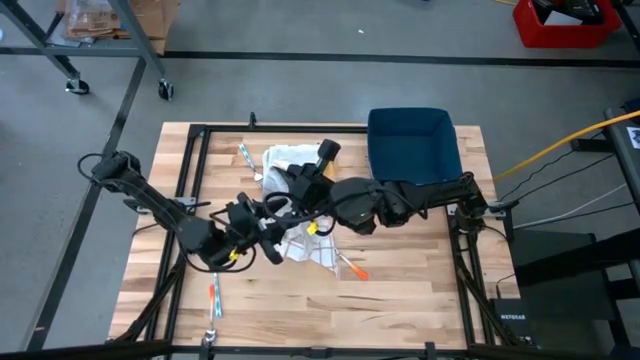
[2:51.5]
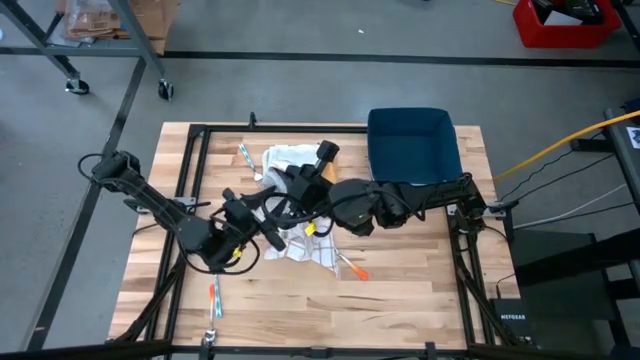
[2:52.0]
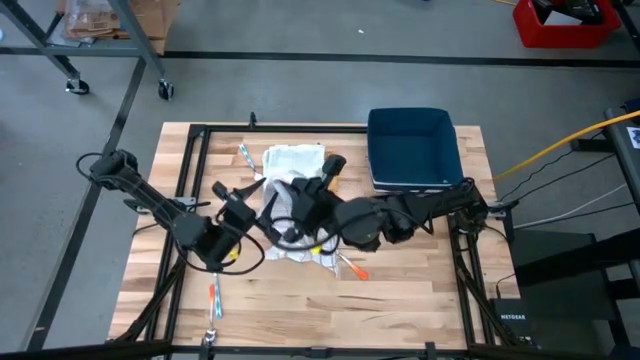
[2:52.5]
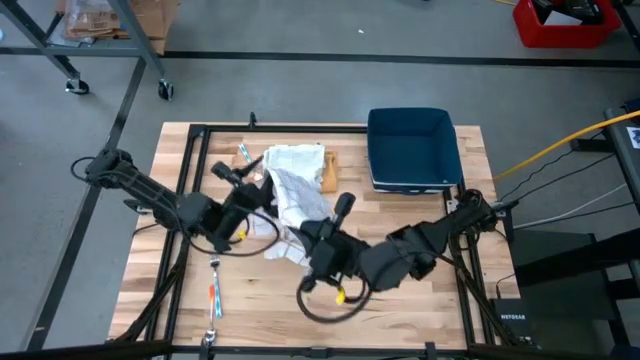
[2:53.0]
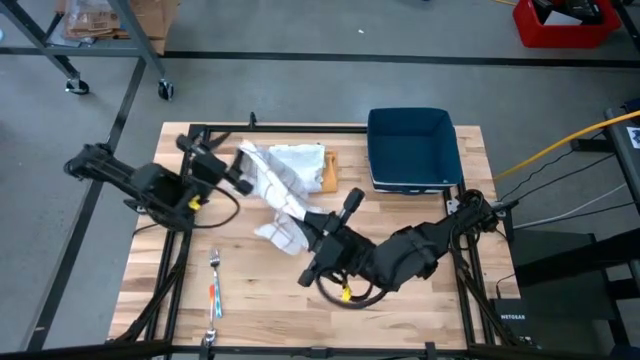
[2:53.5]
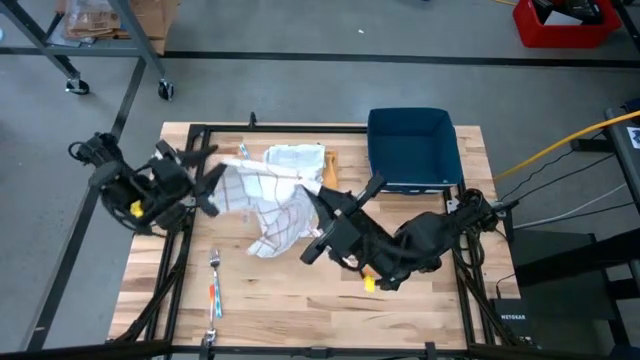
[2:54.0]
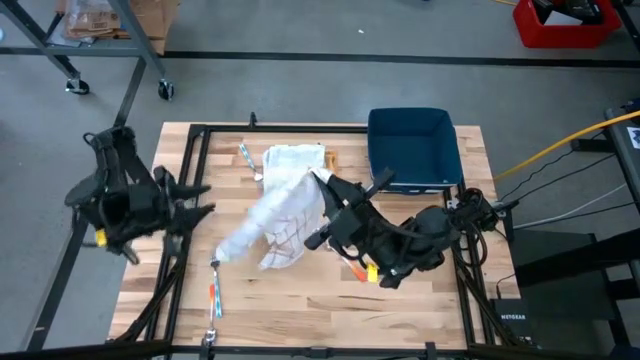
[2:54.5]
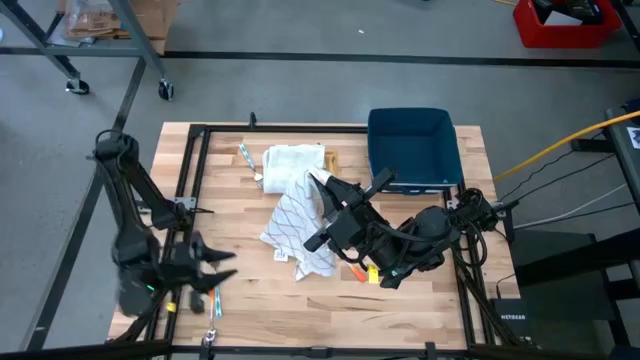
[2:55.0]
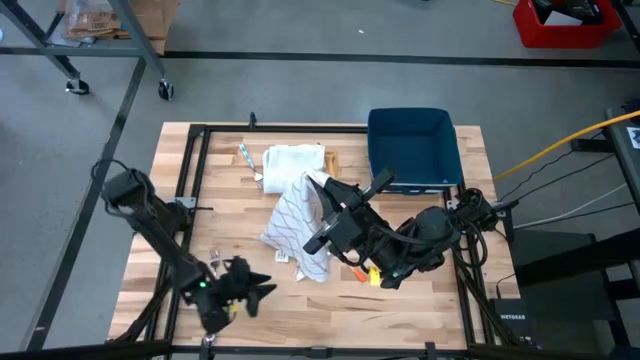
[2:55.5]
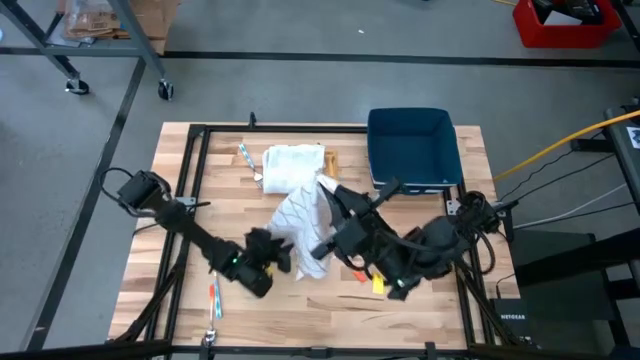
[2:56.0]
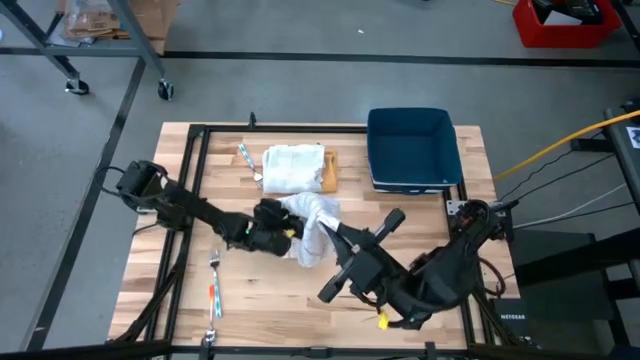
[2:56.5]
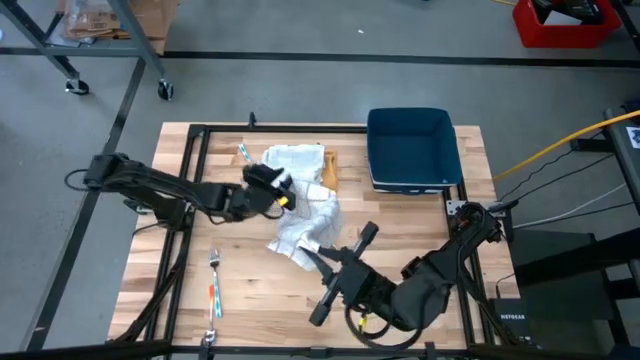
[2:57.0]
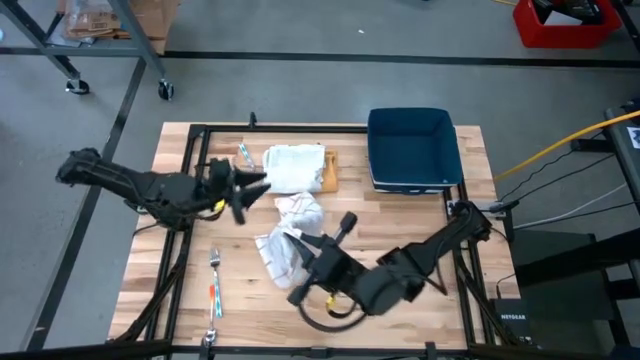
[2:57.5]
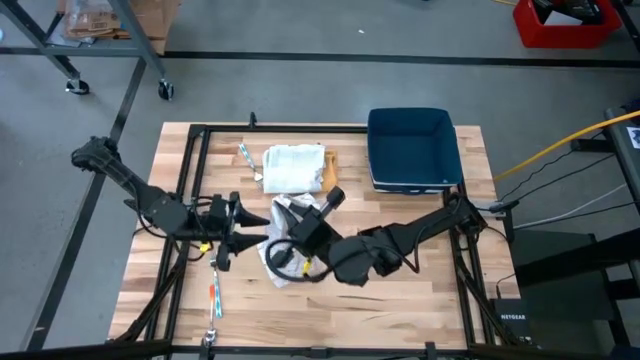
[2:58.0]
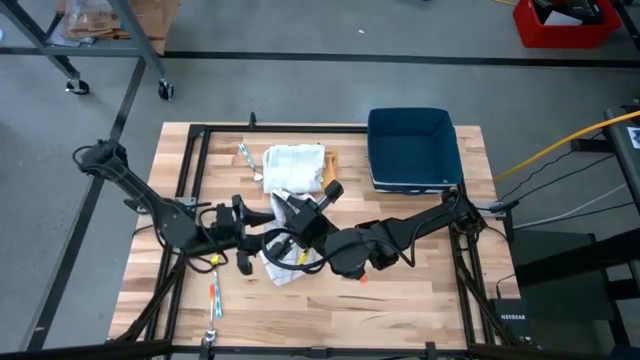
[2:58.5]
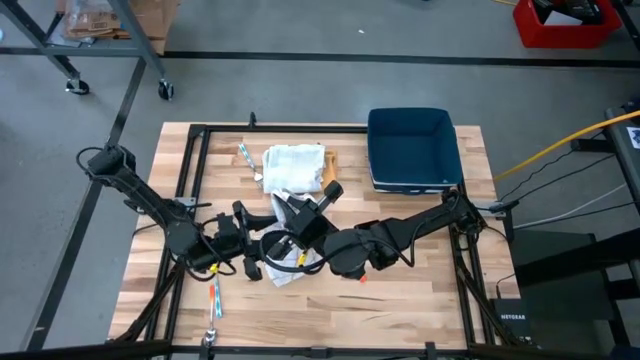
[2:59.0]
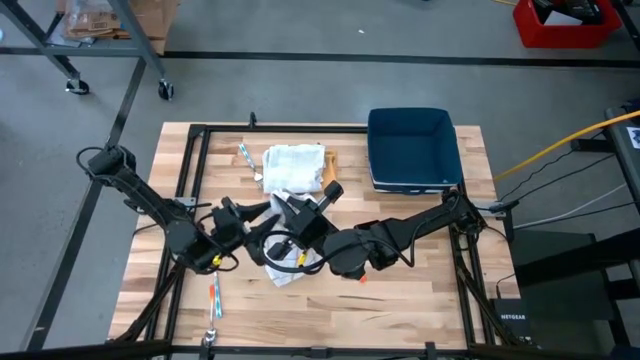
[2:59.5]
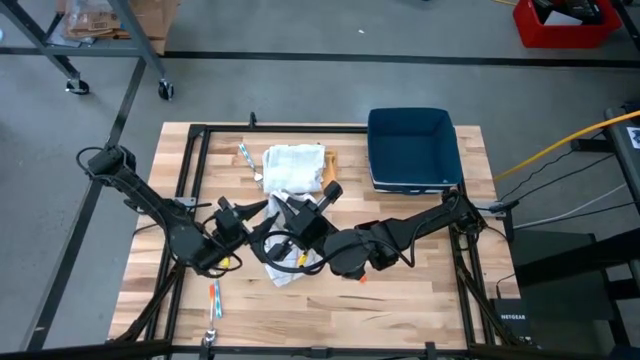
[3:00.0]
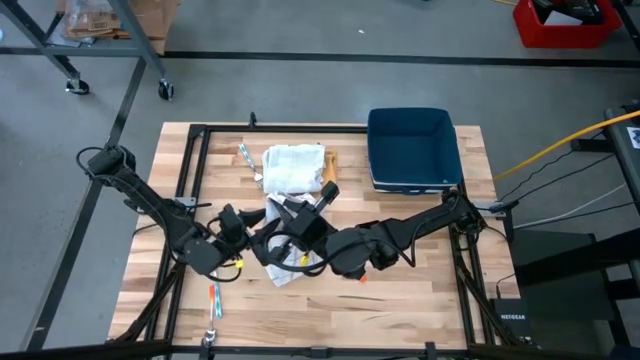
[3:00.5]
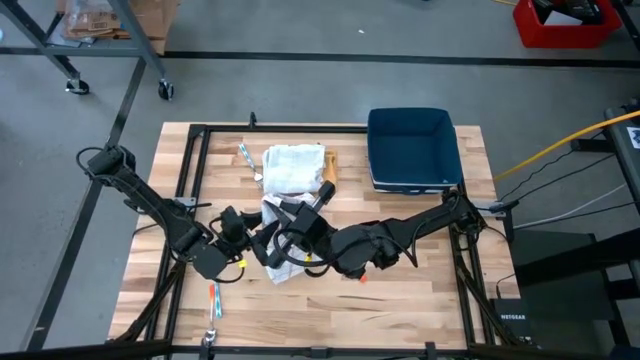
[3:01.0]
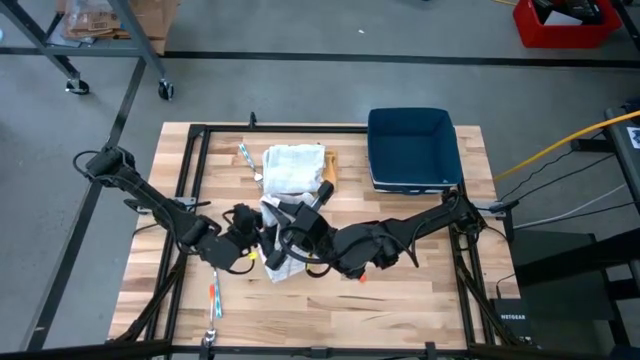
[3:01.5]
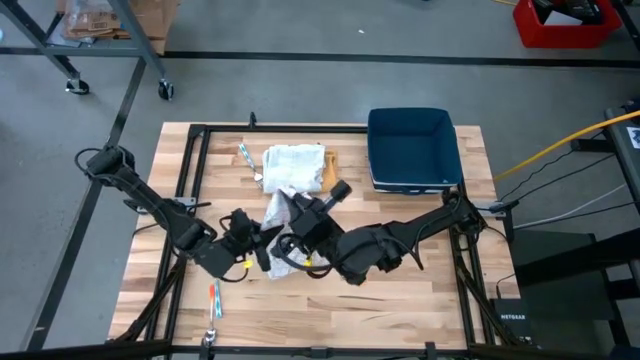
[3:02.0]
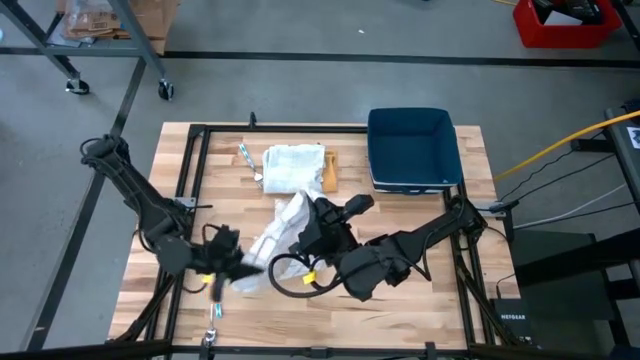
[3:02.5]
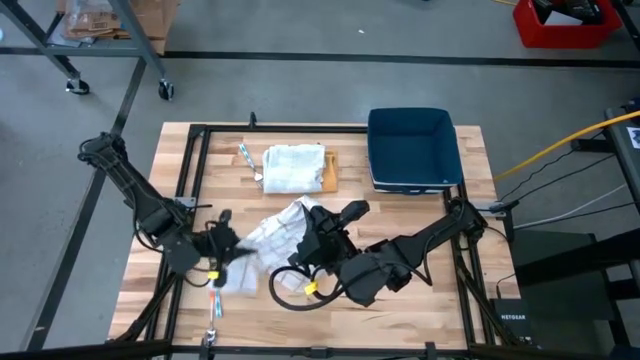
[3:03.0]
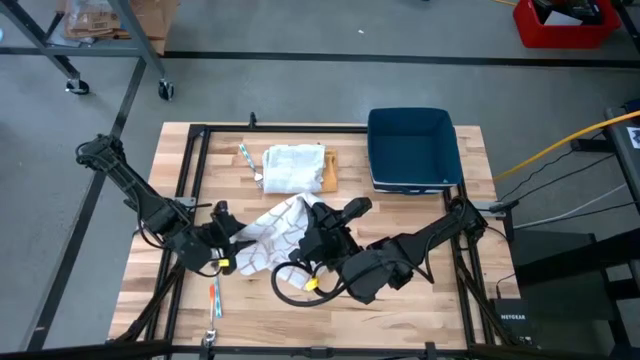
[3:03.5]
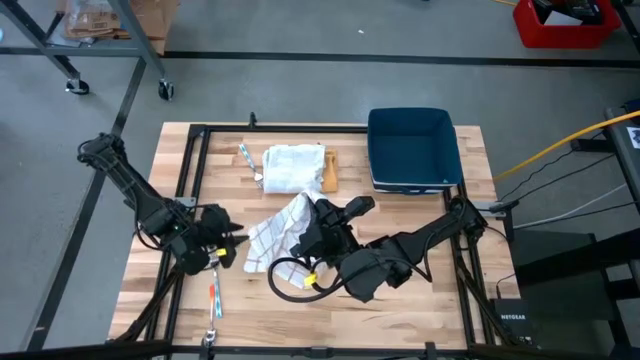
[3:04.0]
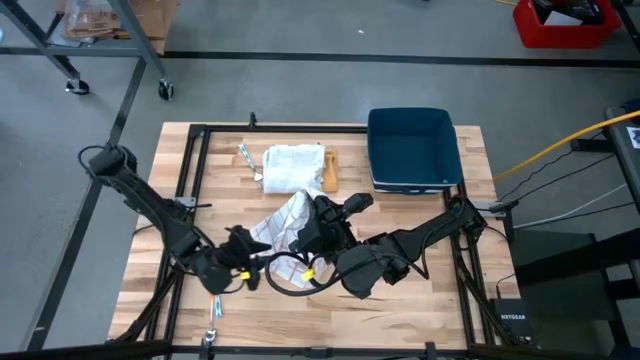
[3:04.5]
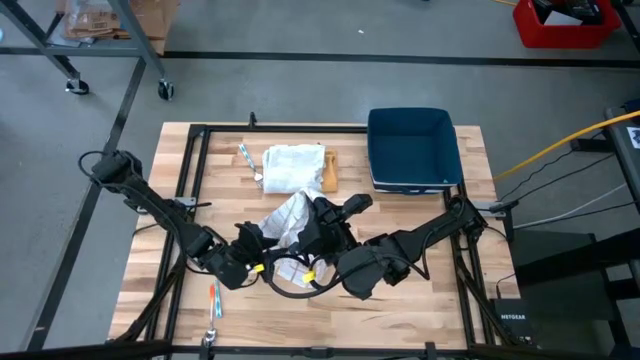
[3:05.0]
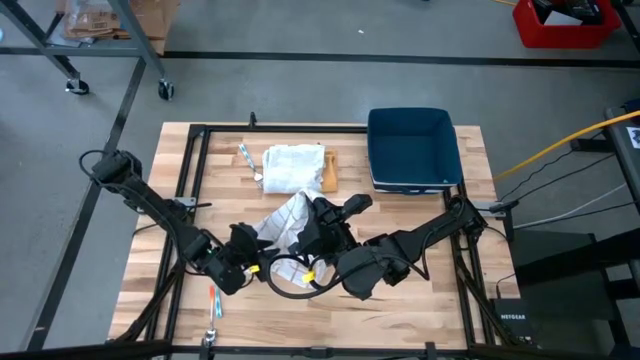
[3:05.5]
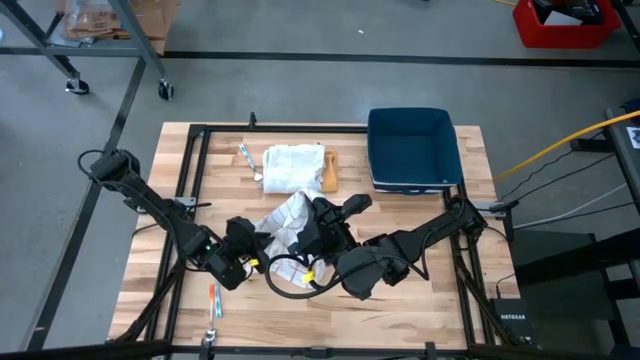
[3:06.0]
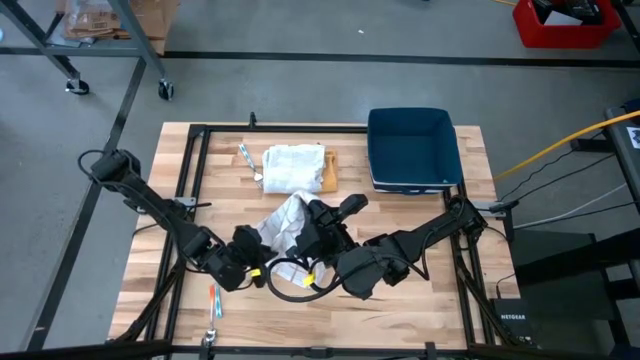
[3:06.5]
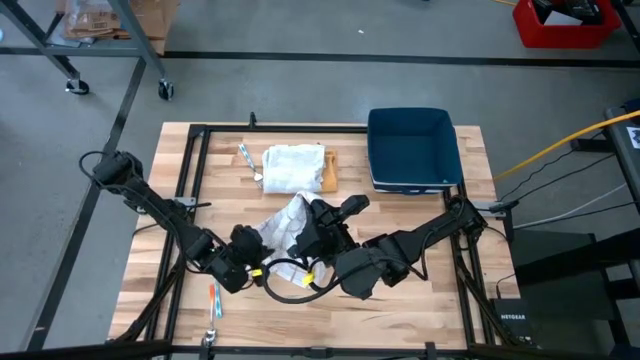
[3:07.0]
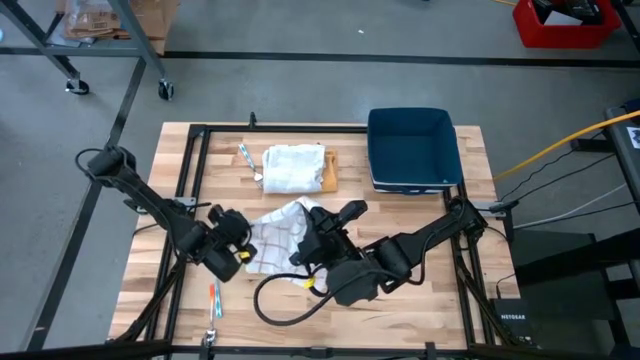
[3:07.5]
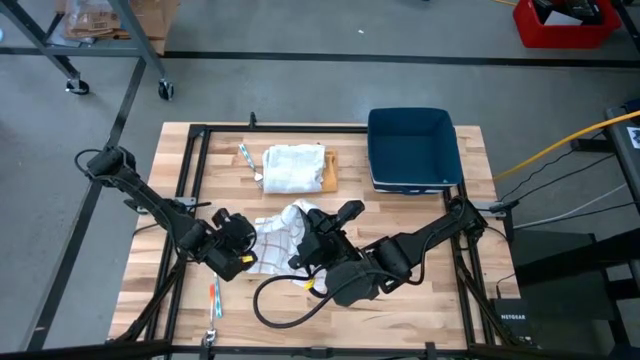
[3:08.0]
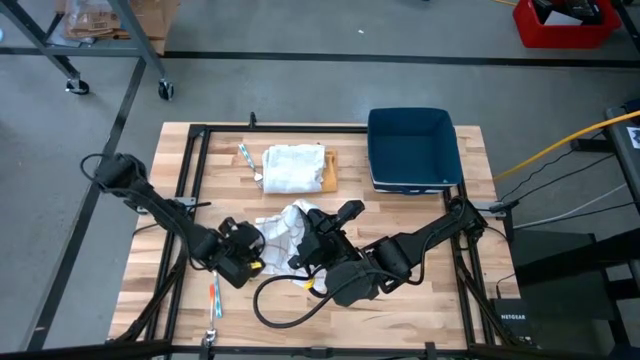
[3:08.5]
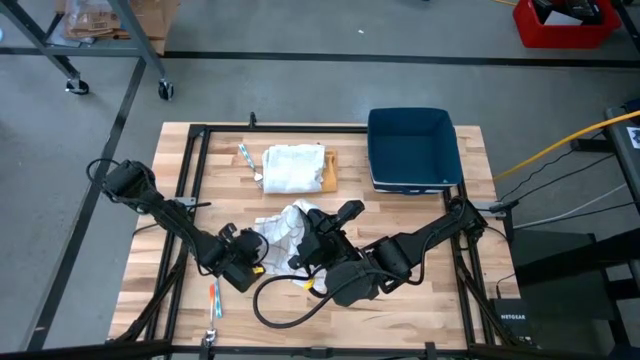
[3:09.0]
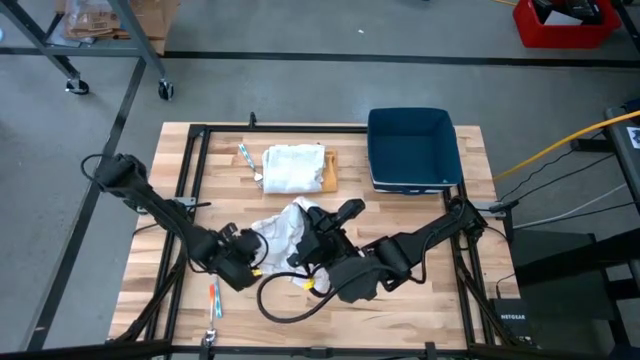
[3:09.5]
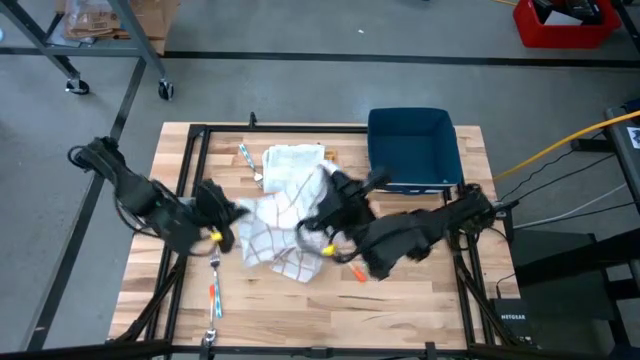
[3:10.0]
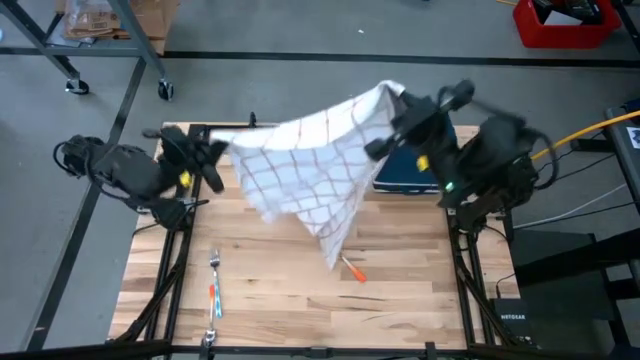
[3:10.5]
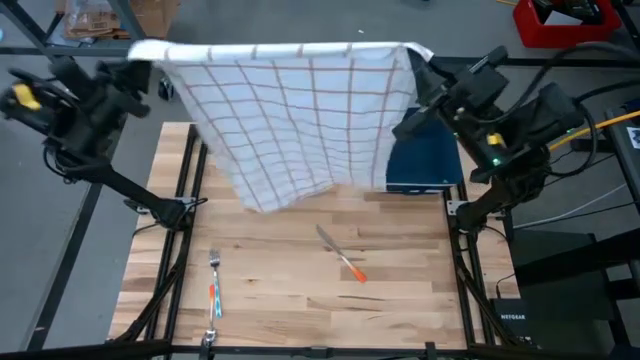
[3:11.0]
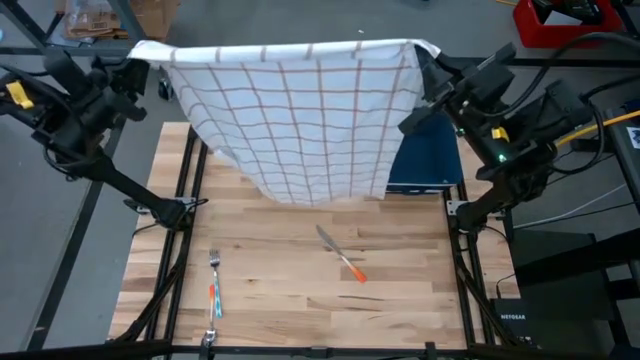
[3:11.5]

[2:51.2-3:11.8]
Task: Fold towel
Fold the white patterned towel
